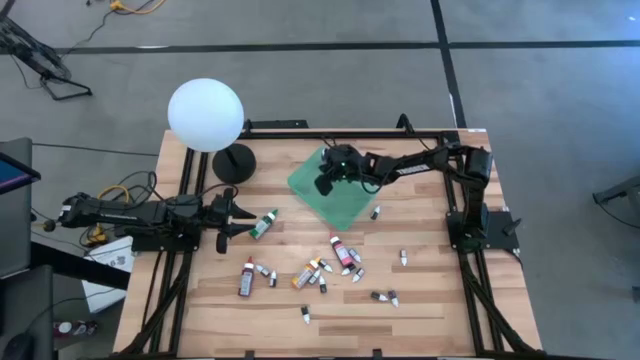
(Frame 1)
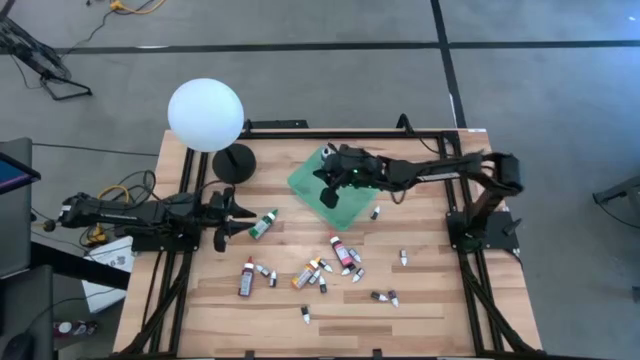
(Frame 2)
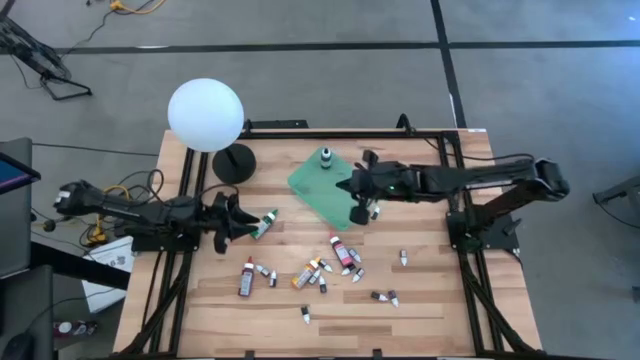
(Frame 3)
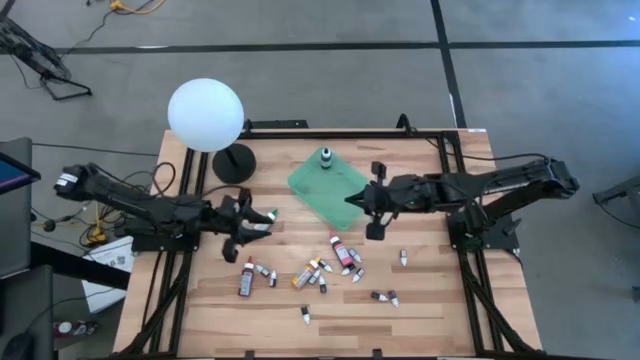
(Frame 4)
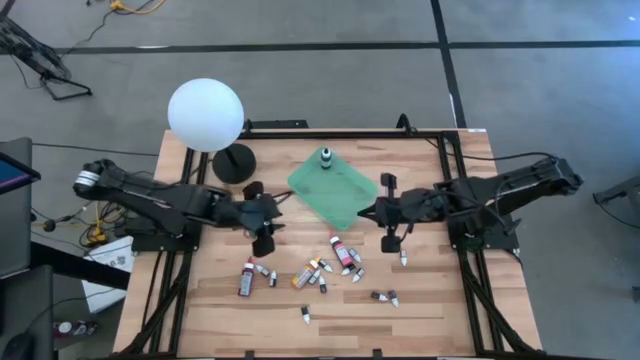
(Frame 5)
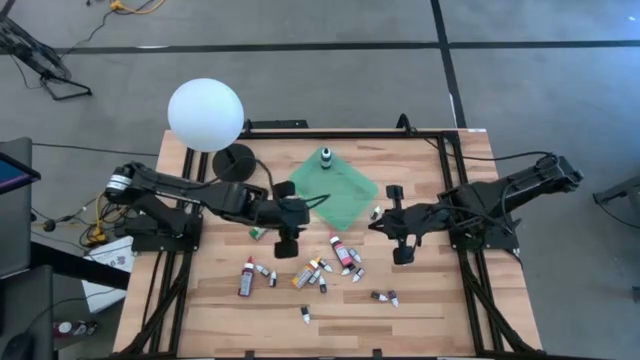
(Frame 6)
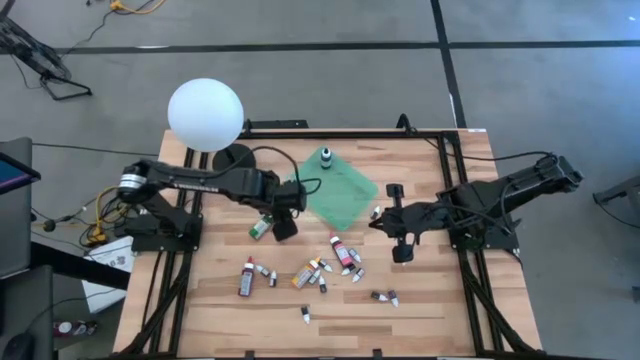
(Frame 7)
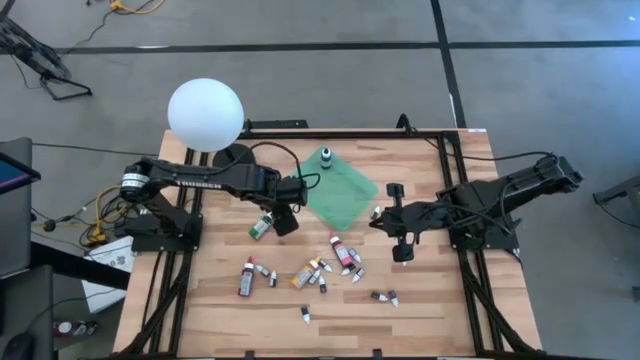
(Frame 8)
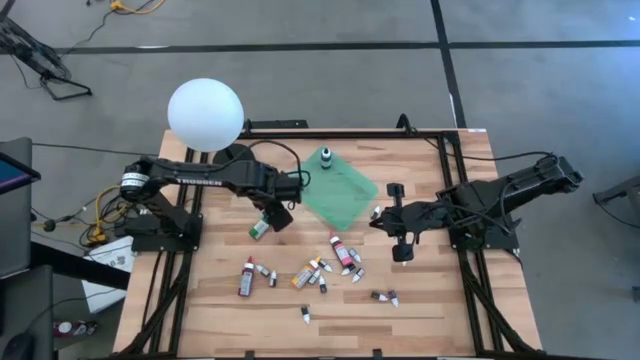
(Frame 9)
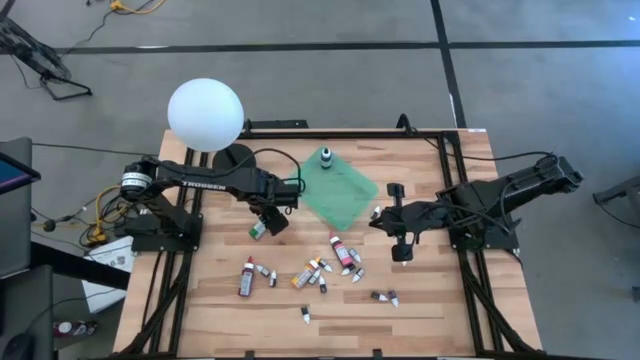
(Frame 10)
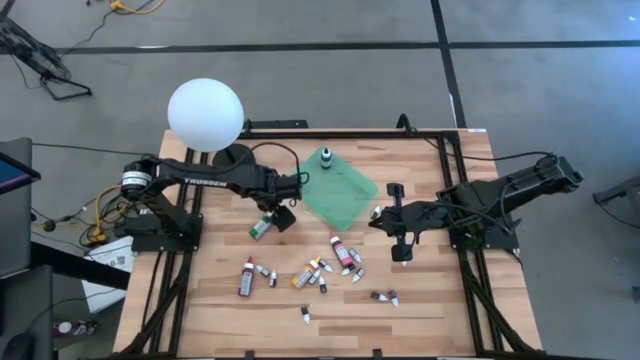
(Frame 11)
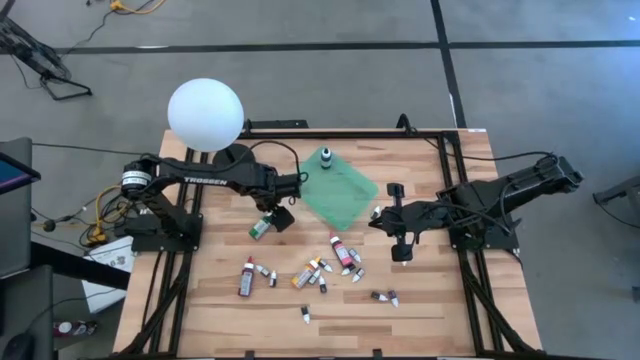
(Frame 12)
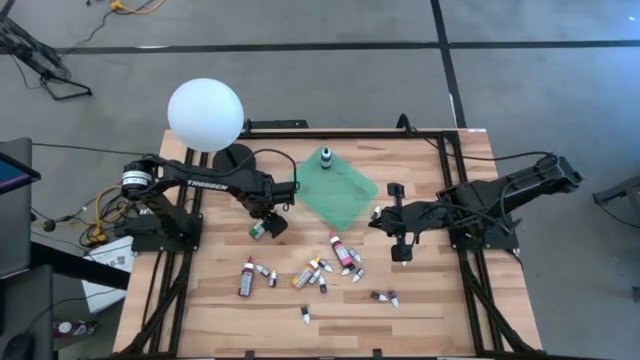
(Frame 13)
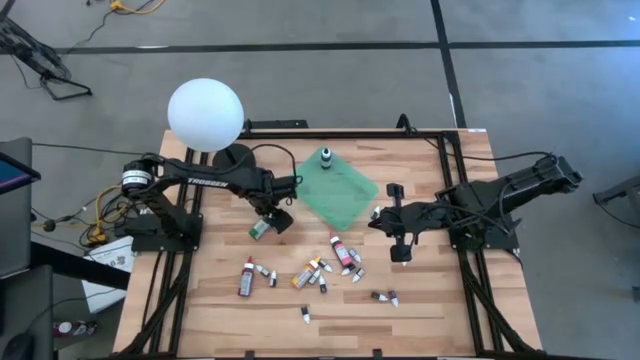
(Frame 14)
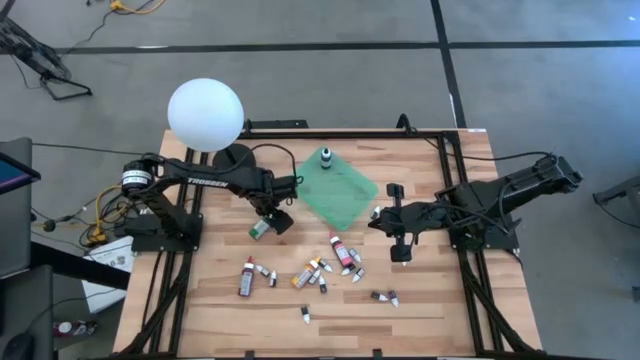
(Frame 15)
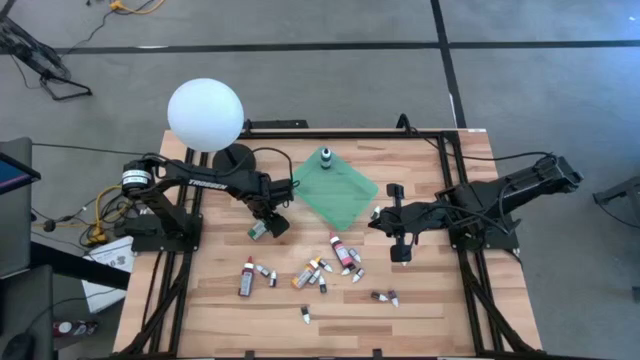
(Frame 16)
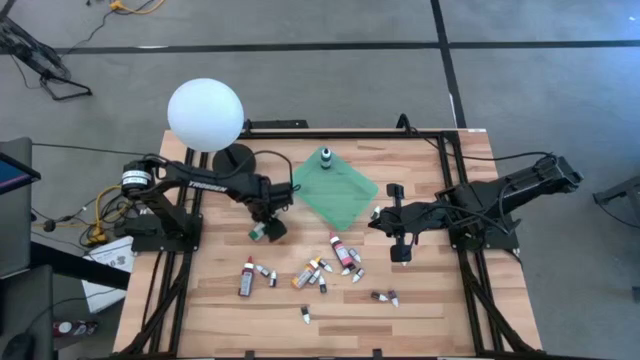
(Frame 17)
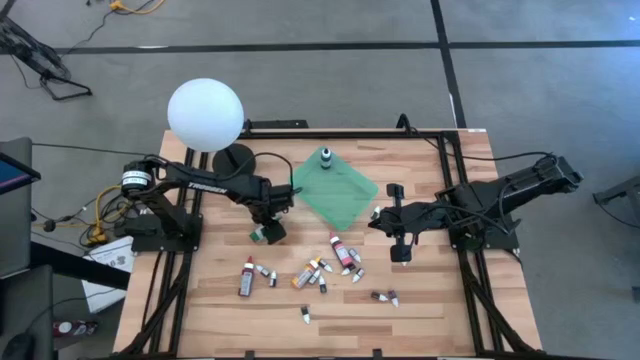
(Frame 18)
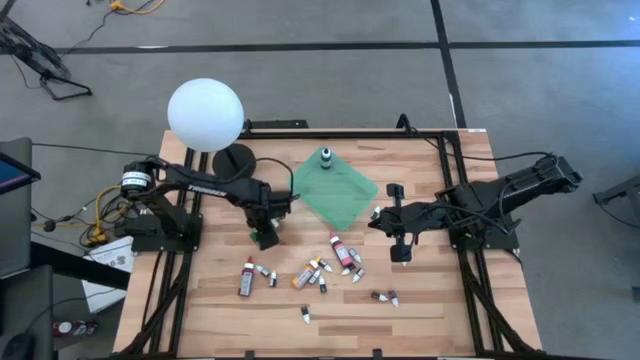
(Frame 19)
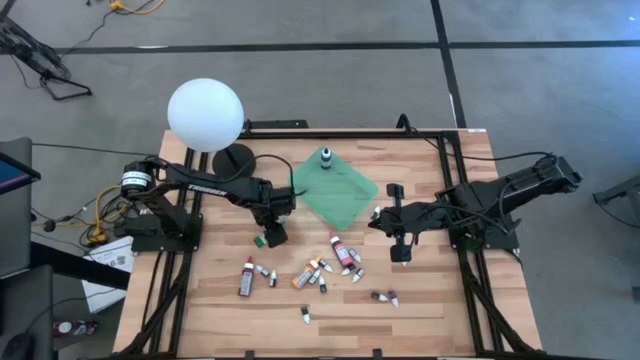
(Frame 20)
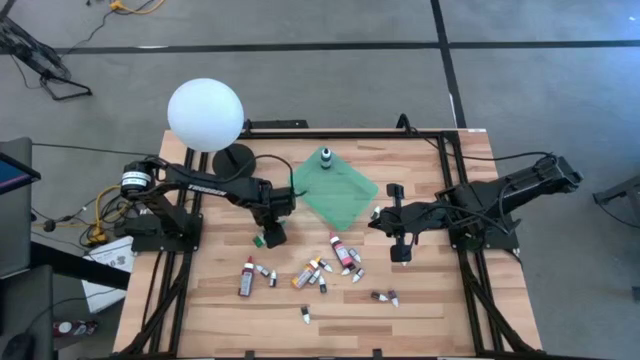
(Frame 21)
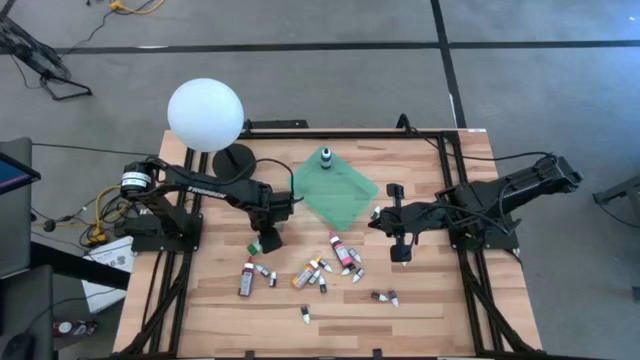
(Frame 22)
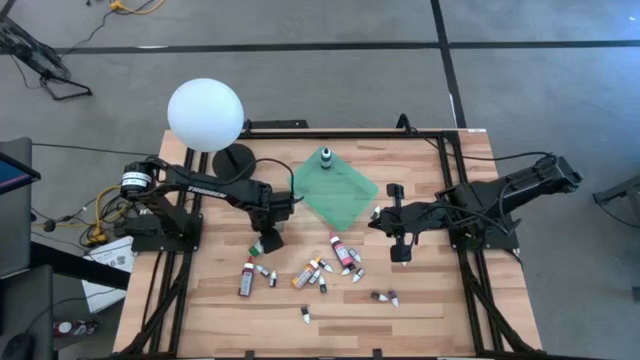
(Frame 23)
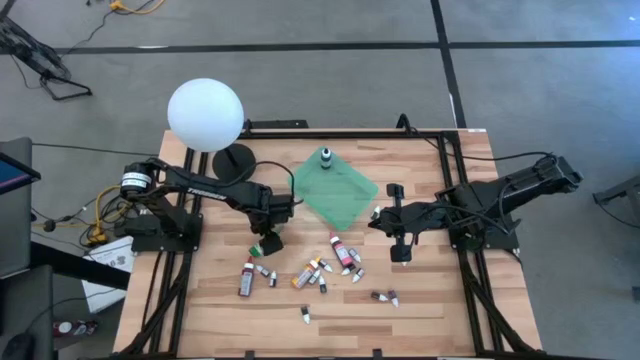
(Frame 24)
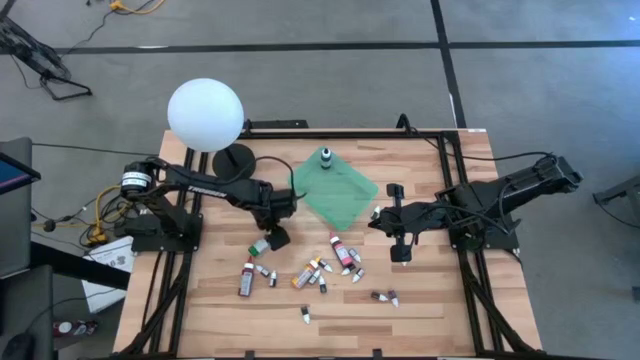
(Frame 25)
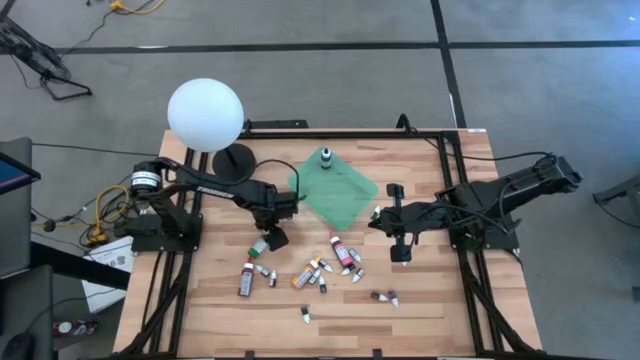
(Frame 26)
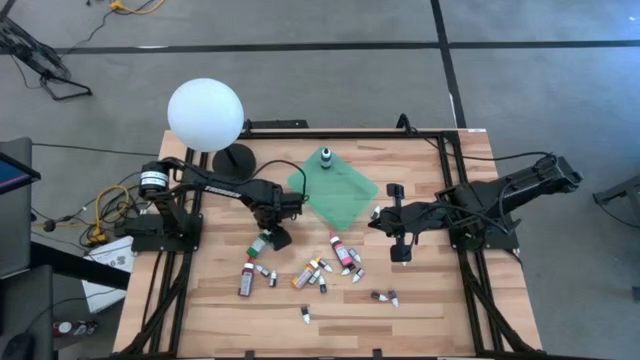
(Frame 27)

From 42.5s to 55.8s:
Task: Pick & Place food coloring
Put the large green food coloring bottle into the green bin

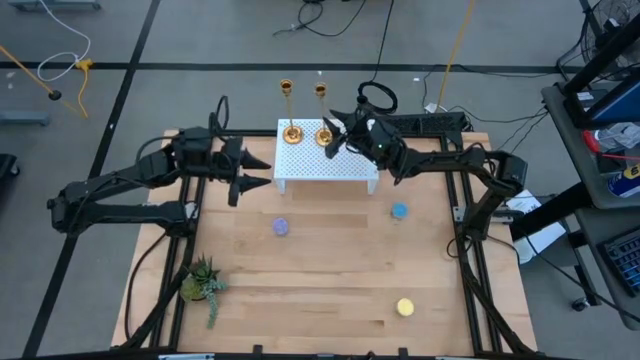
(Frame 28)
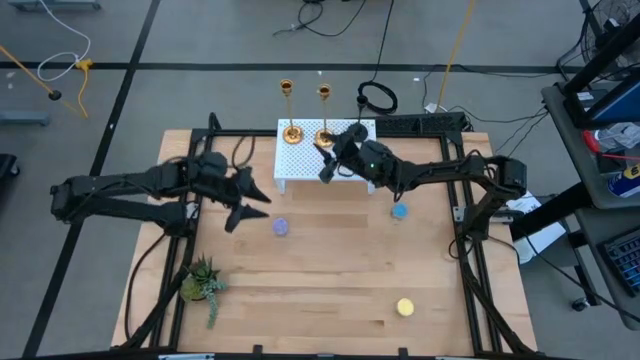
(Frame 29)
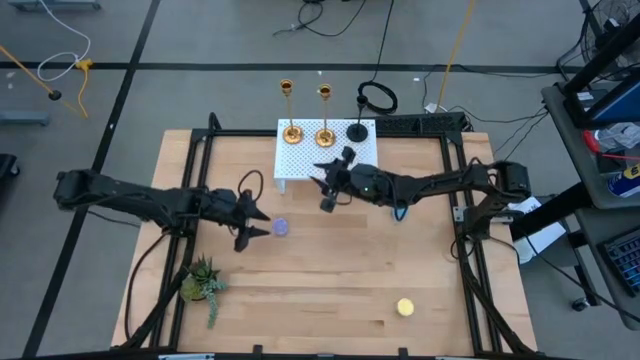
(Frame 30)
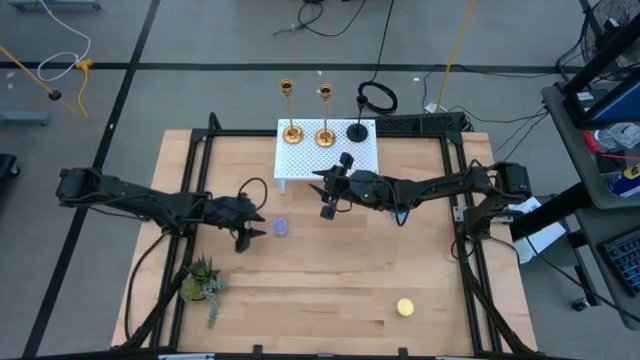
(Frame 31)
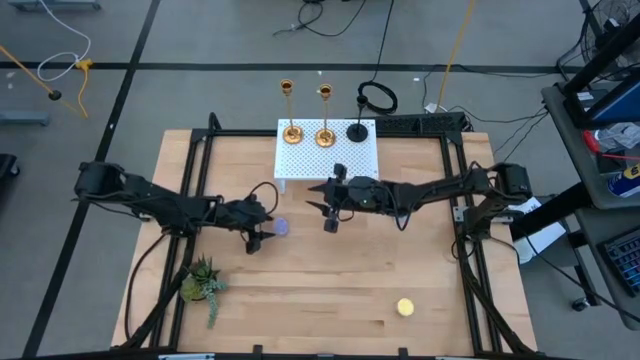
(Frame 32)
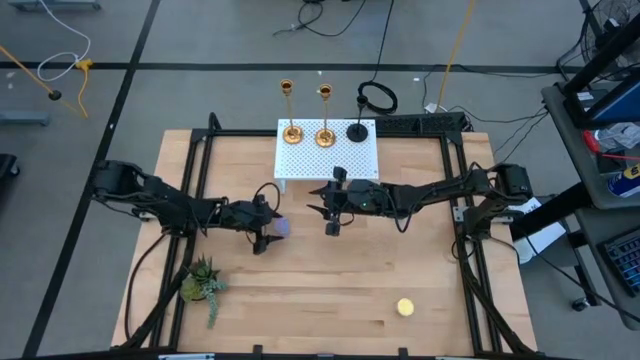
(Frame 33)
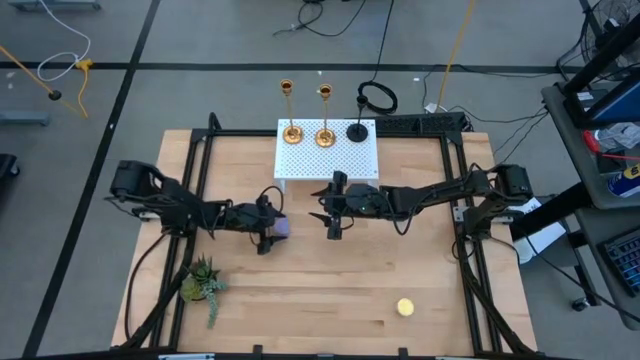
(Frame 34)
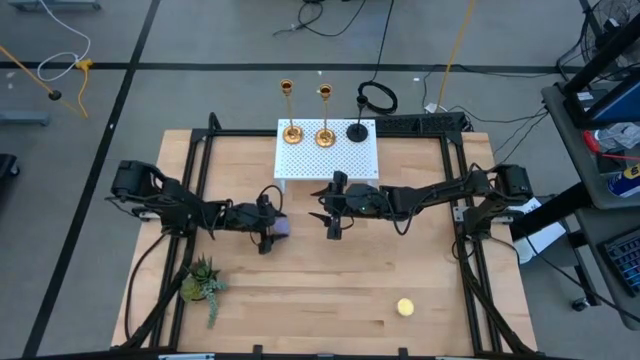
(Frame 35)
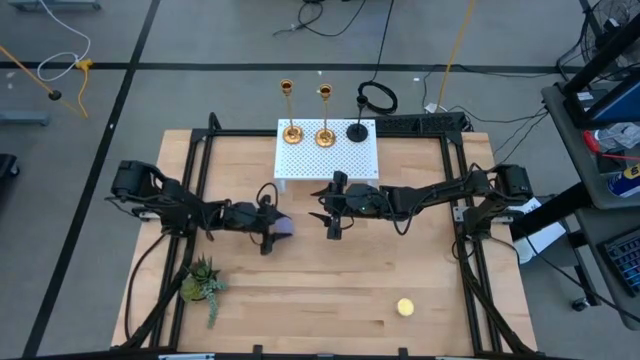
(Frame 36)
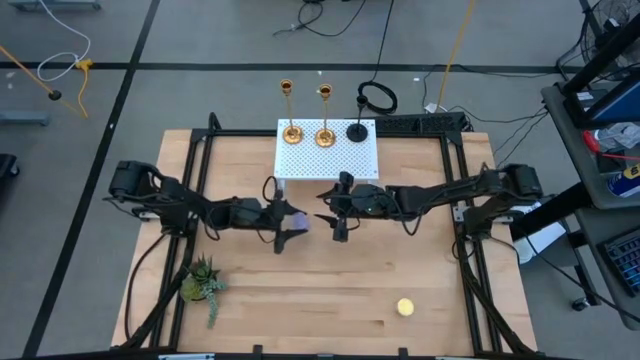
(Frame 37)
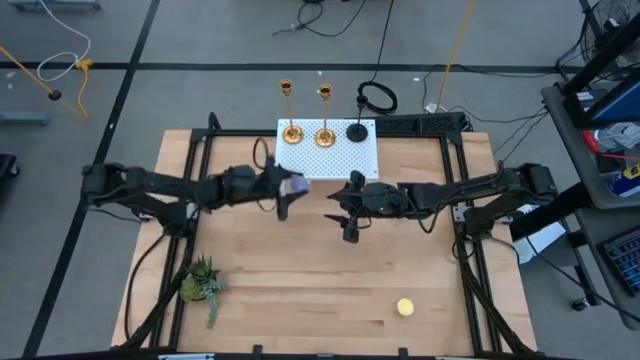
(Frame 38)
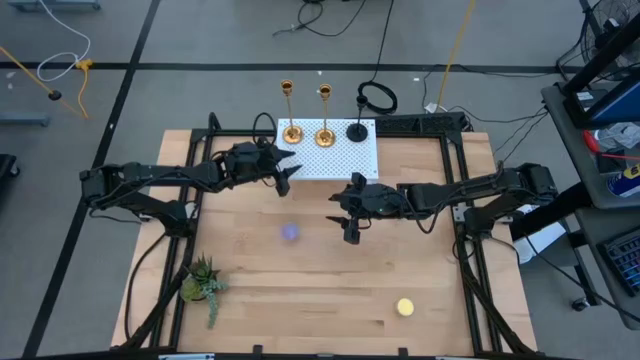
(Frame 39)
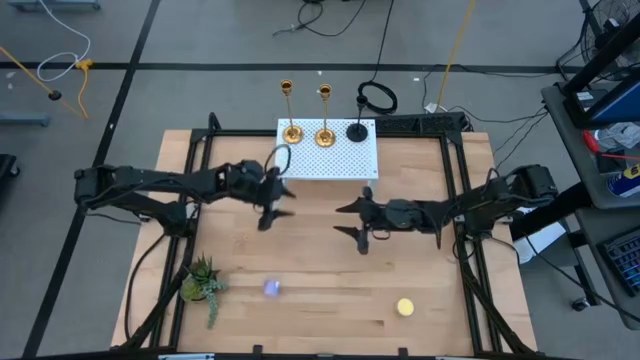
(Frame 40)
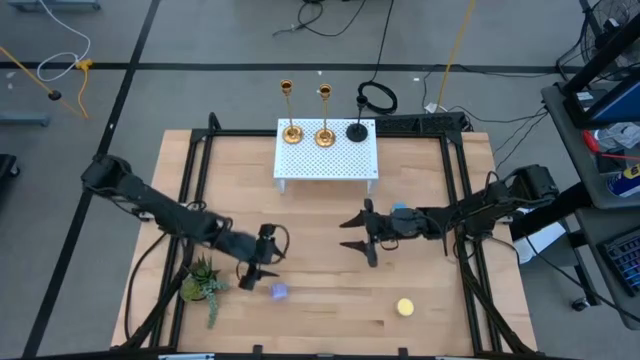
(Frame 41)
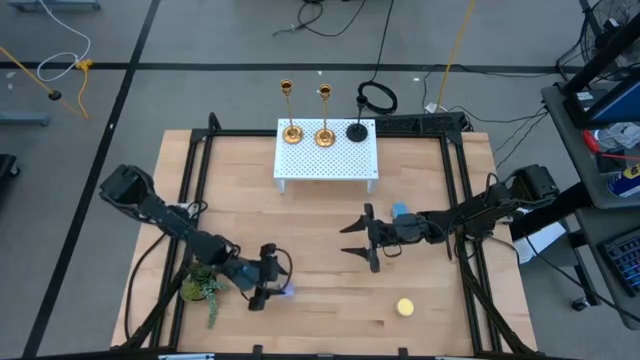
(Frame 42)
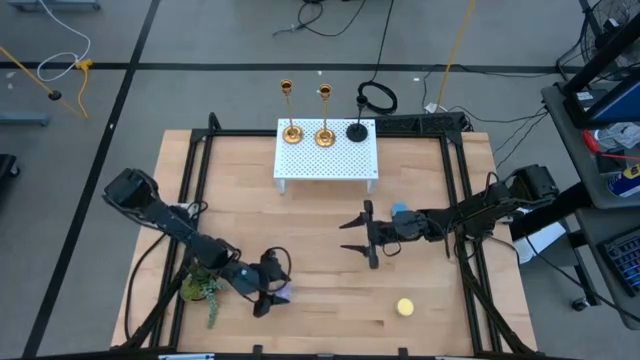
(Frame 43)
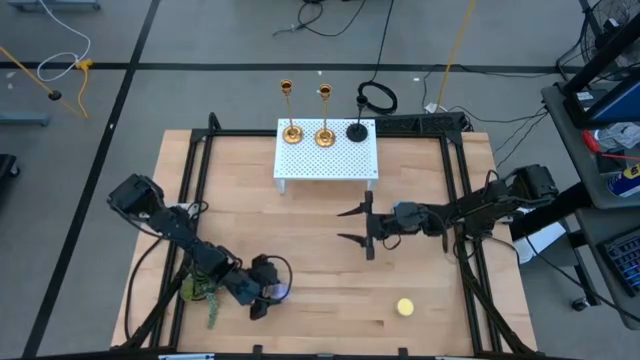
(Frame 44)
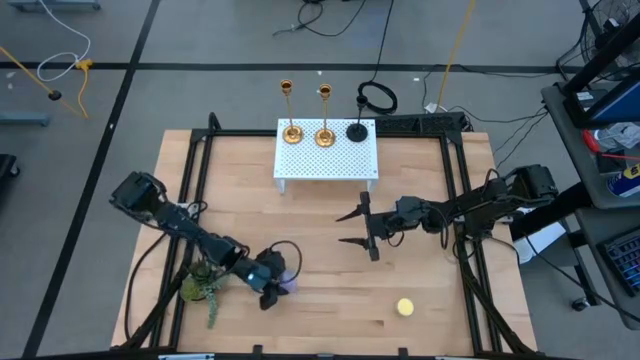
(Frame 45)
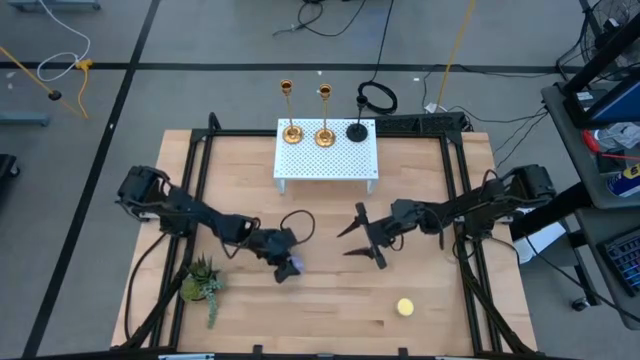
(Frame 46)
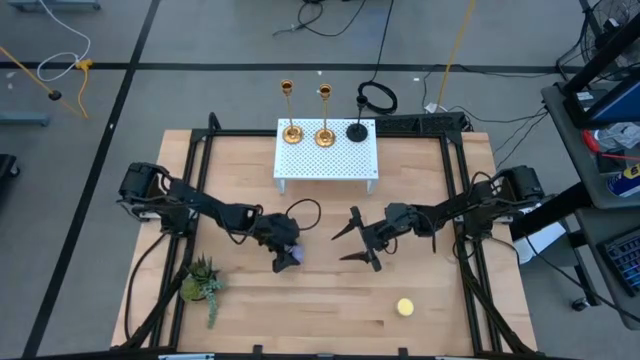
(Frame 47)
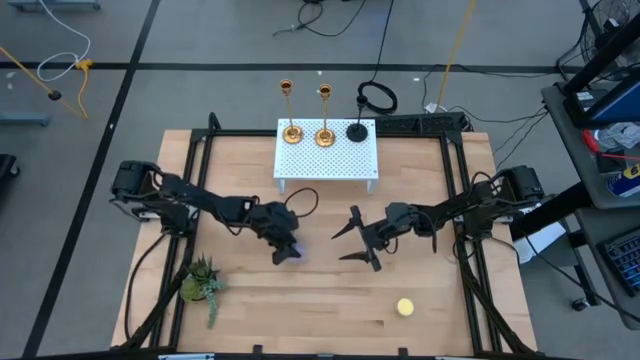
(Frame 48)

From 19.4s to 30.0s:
Task: Pick & Place candle stick holders
Put the purple scented candle on the shelf
